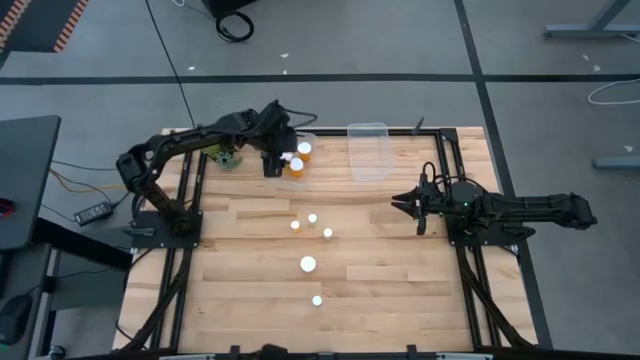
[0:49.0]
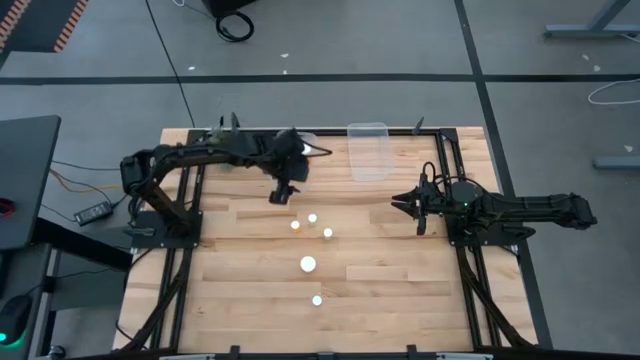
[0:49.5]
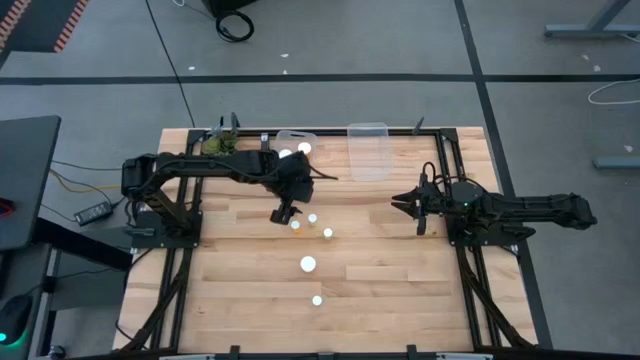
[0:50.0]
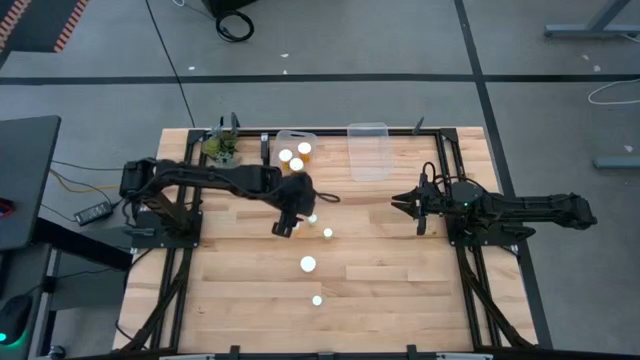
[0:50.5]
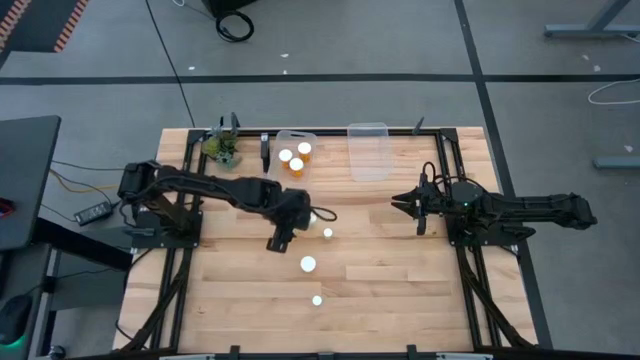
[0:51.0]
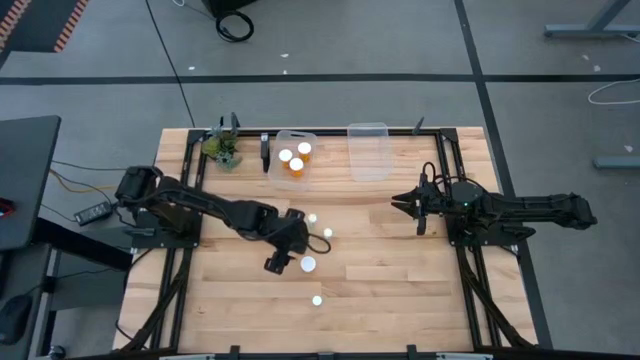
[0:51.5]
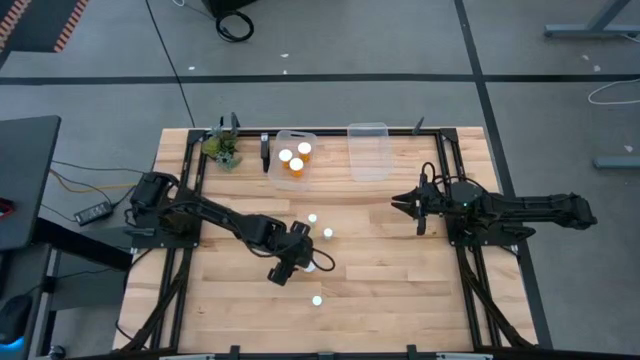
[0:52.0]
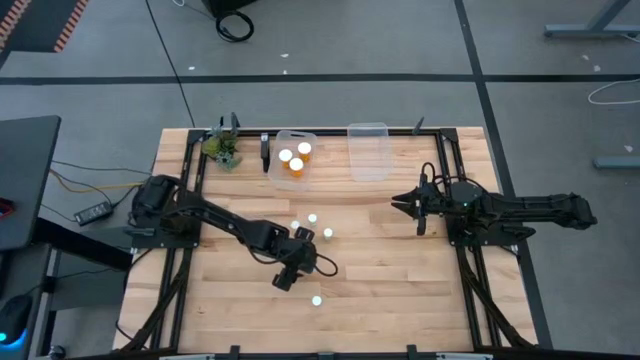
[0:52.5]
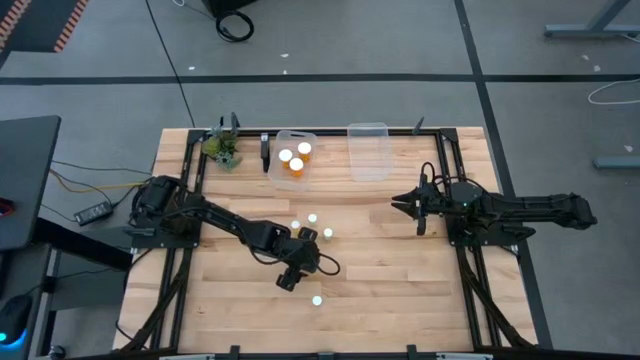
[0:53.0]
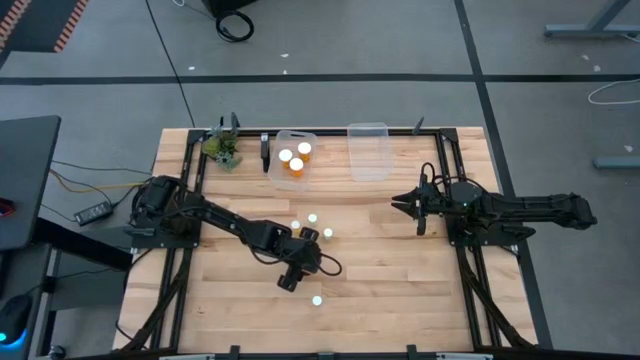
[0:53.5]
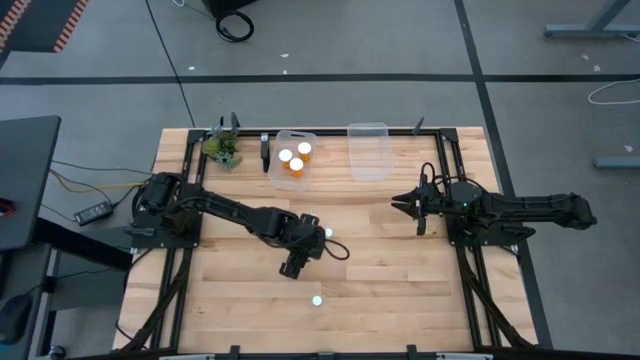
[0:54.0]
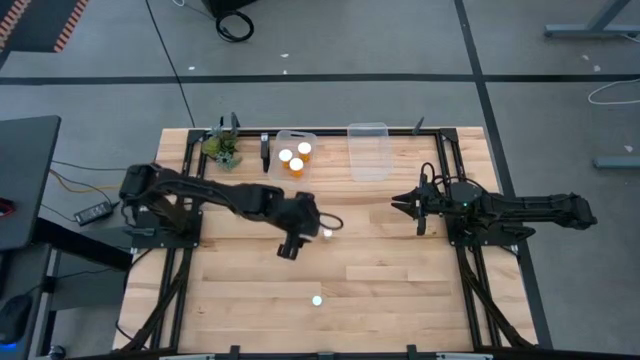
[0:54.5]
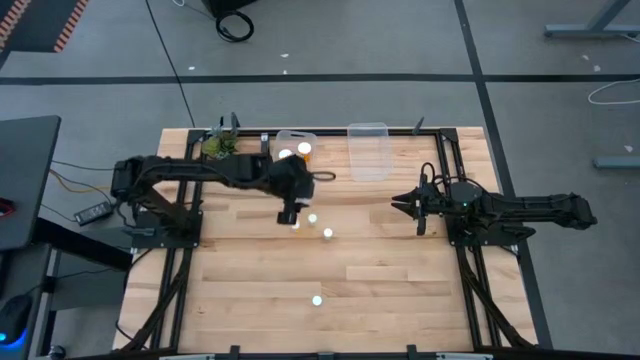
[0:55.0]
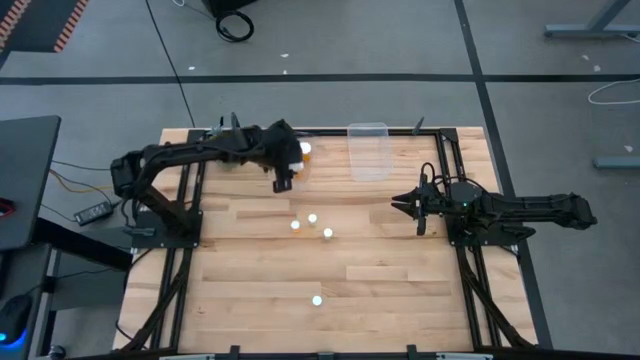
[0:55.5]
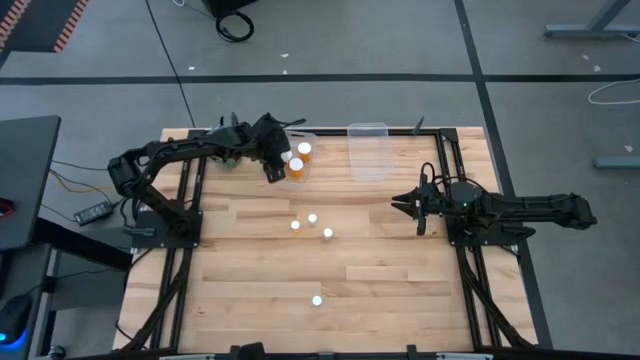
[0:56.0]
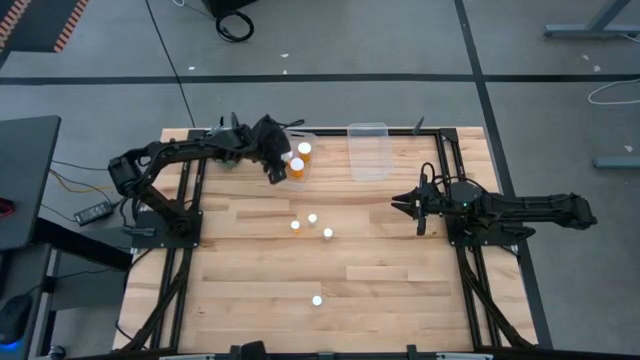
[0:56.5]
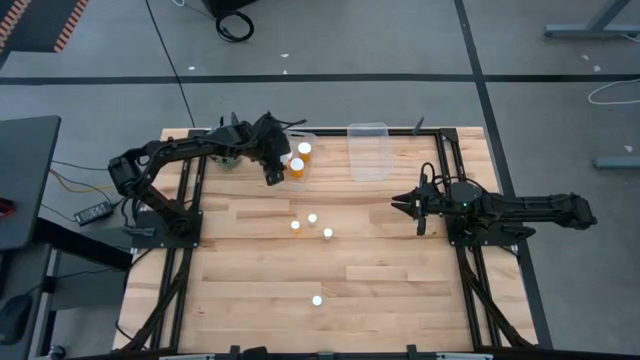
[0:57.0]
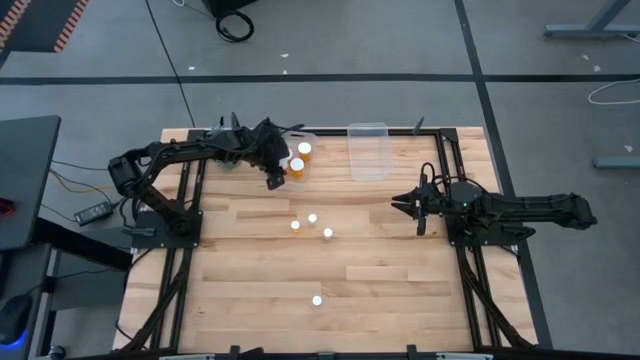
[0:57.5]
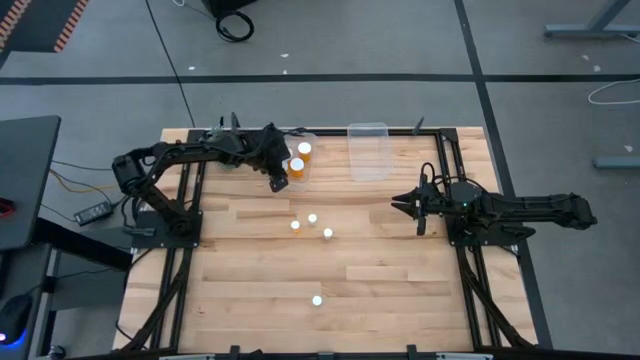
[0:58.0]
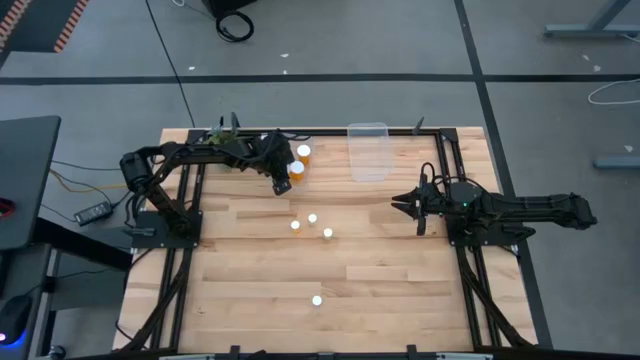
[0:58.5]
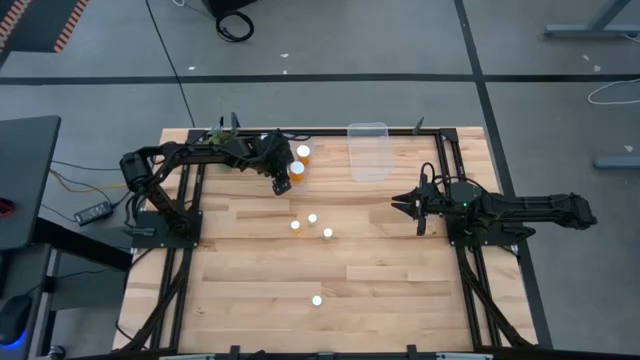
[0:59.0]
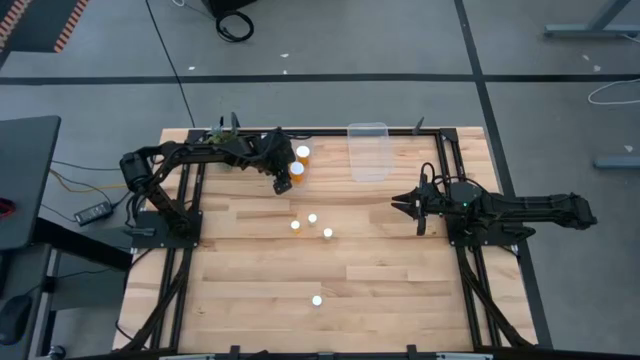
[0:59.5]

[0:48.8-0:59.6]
Task: Pick and place medicine bottles into bin by pill shape (circle, oval)
Put the large orange pill bottle into the left transparent bin

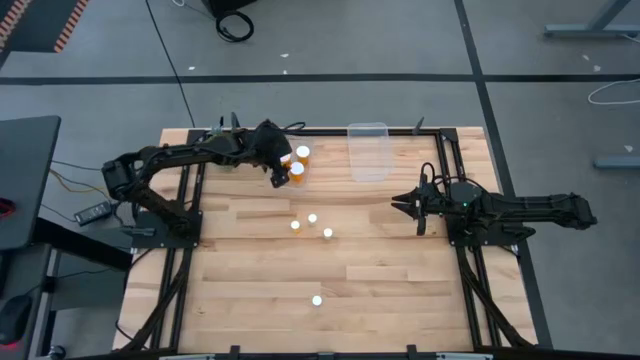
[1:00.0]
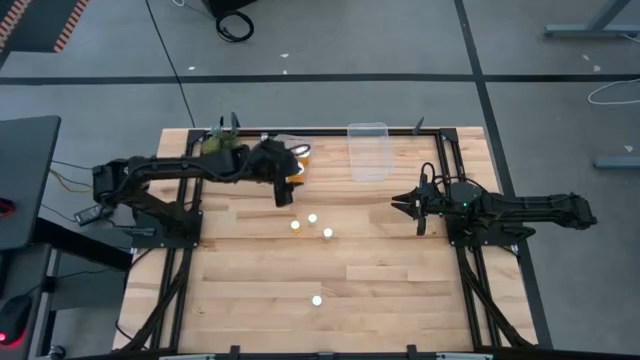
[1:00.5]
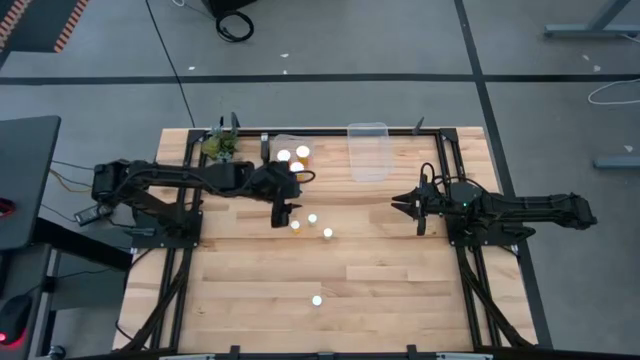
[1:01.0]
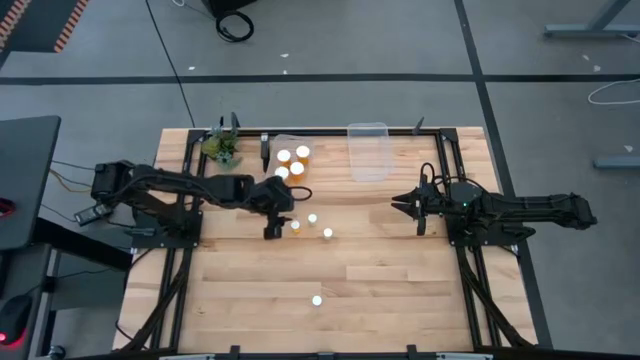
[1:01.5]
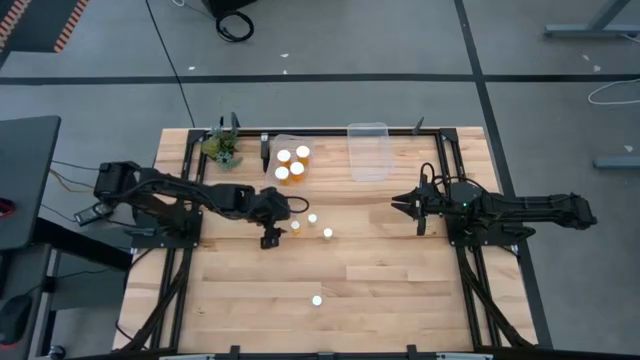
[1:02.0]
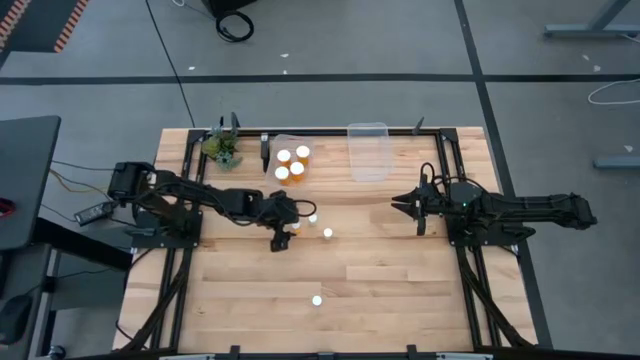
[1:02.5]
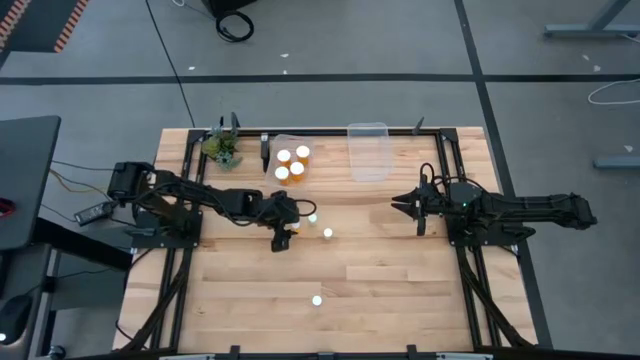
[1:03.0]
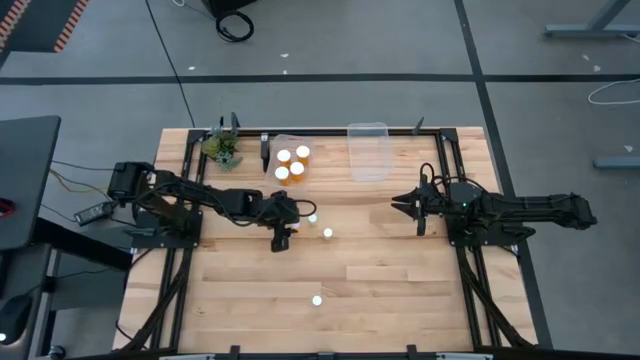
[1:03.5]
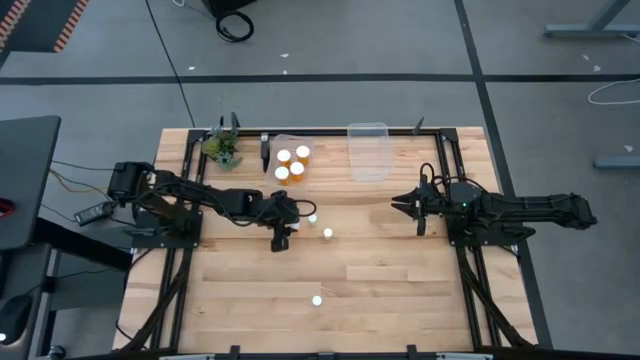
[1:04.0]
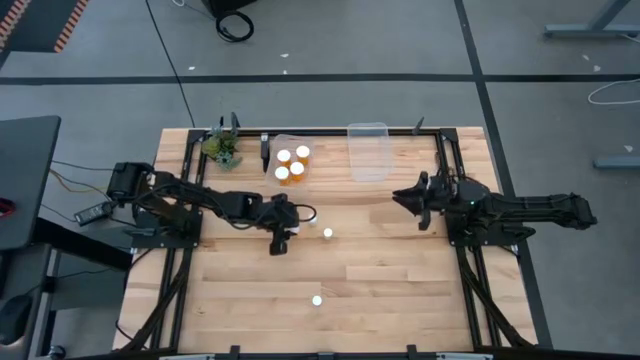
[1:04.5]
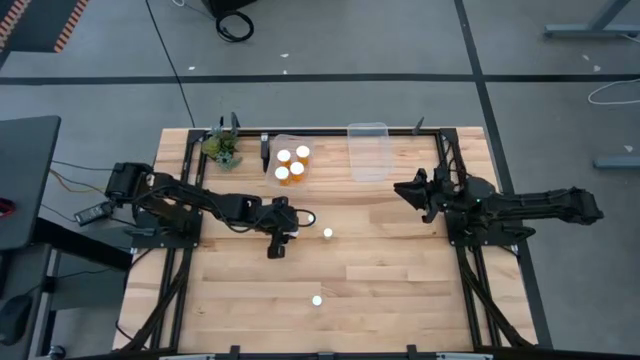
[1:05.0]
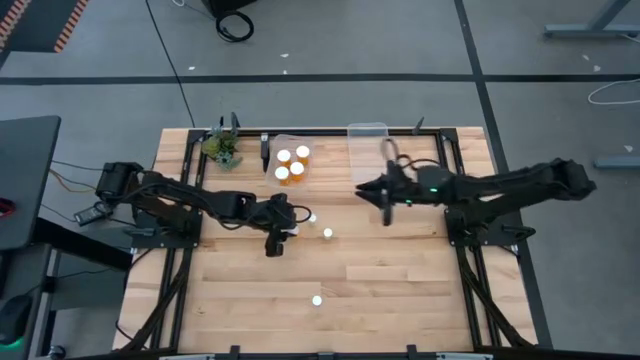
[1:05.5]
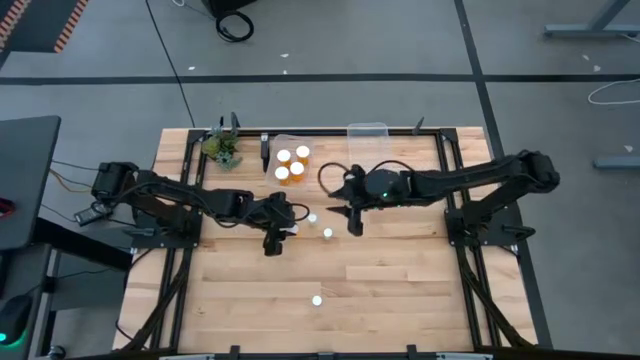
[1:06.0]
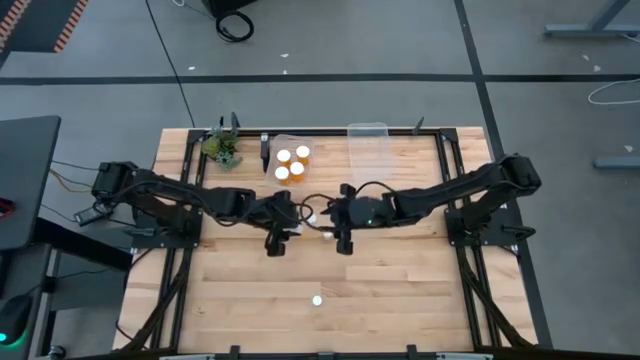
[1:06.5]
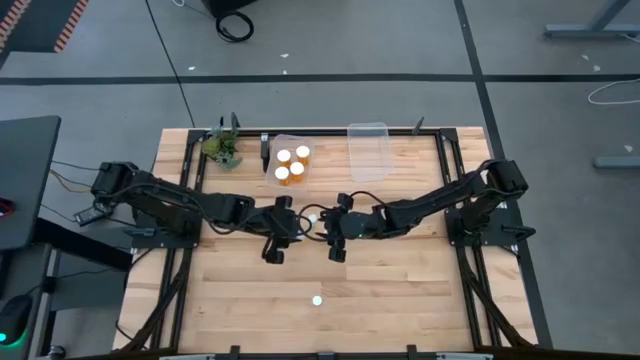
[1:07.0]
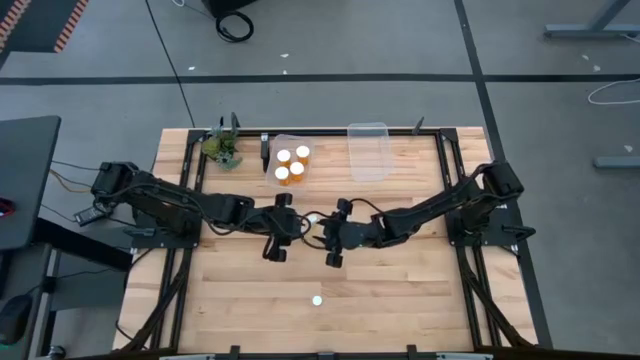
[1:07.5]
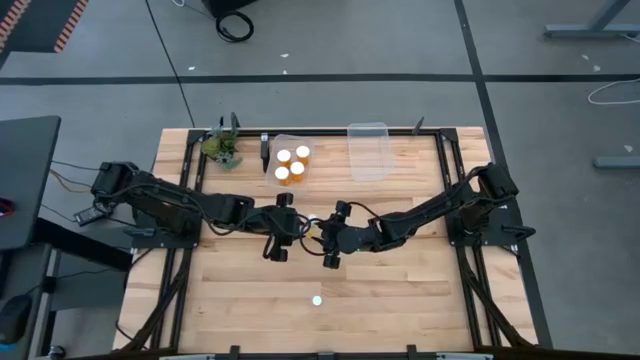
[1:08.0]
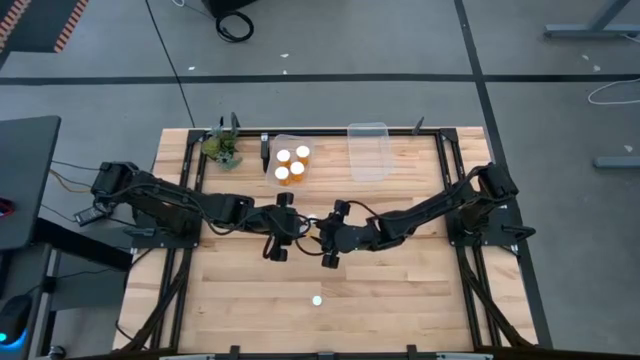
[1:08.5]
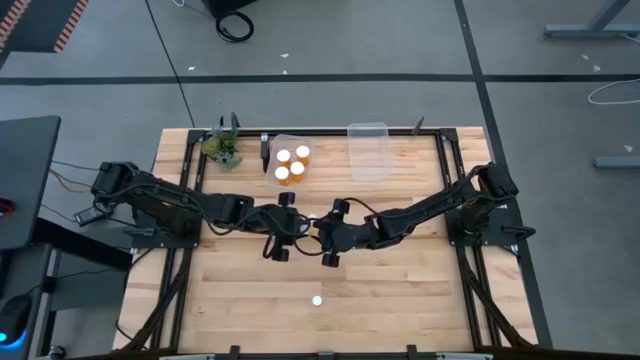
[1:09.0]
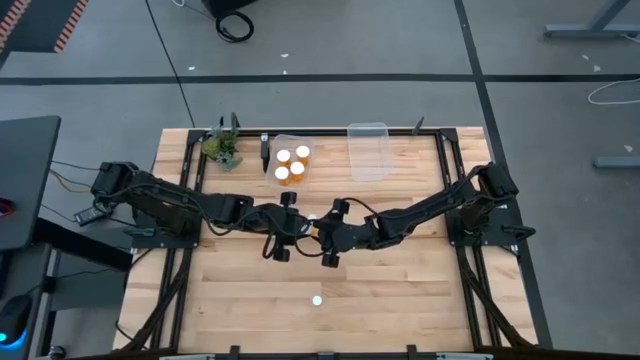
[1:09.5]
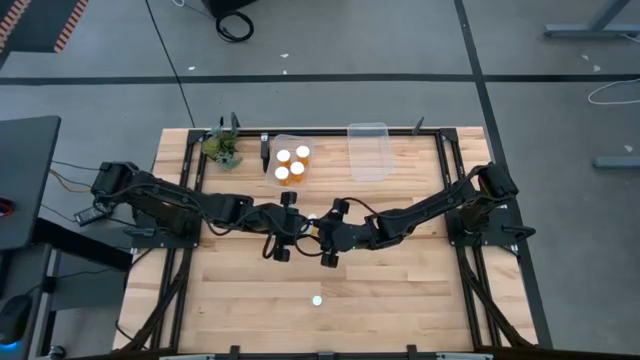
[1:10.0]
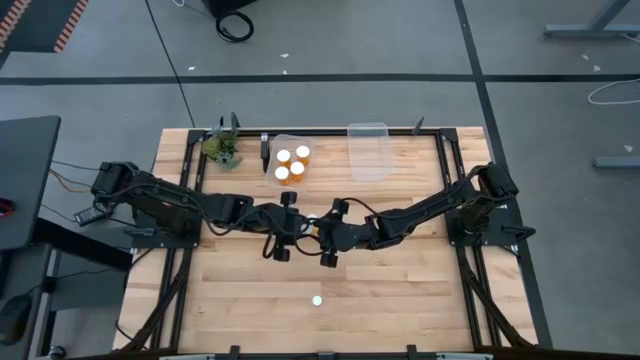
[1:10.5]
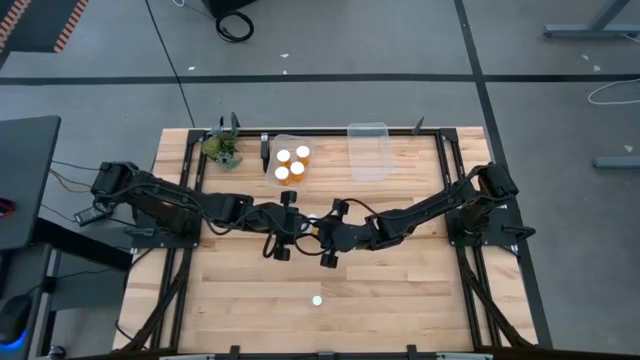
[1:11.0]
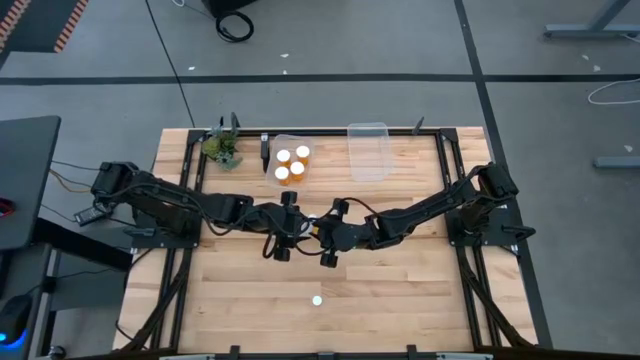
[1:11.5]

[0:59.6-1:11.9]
Put the small orange pill bottle into the right transparent bin
